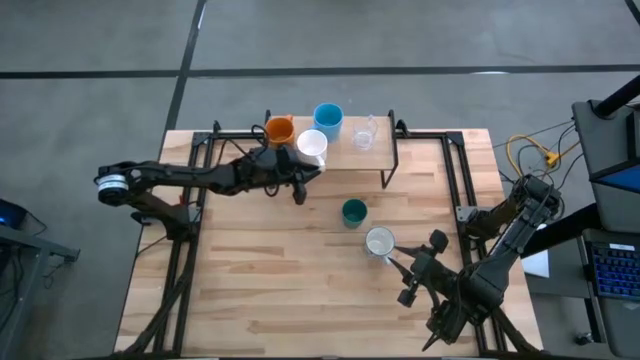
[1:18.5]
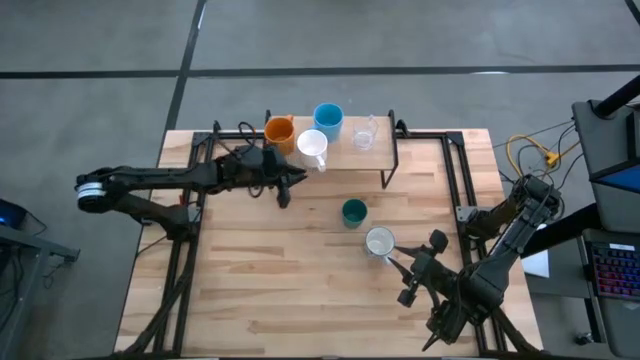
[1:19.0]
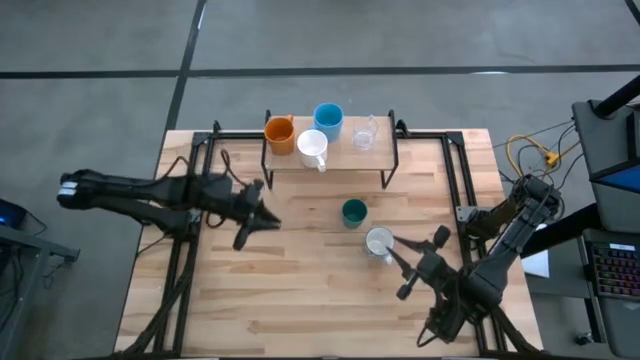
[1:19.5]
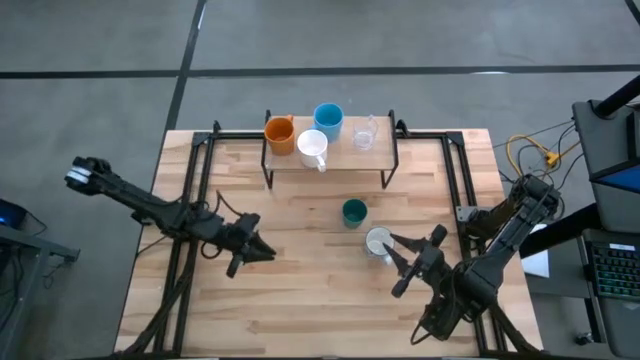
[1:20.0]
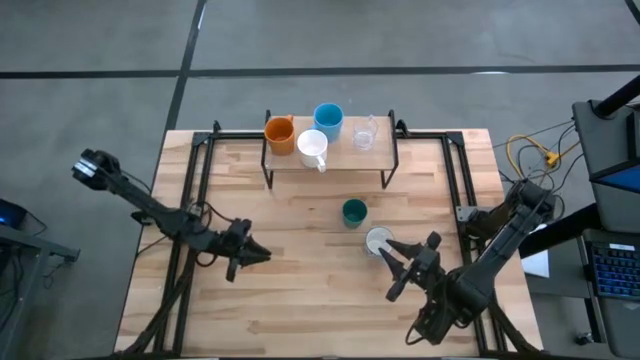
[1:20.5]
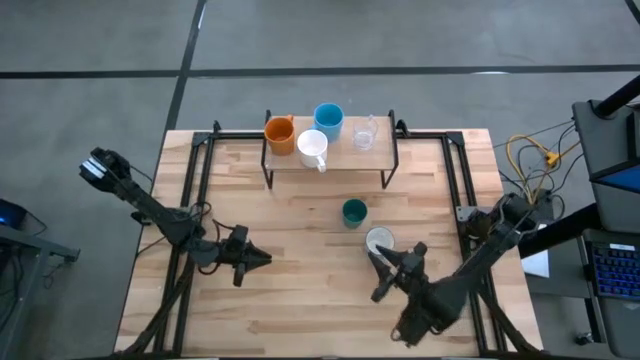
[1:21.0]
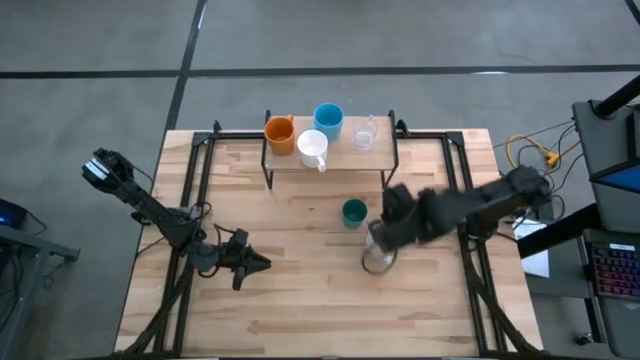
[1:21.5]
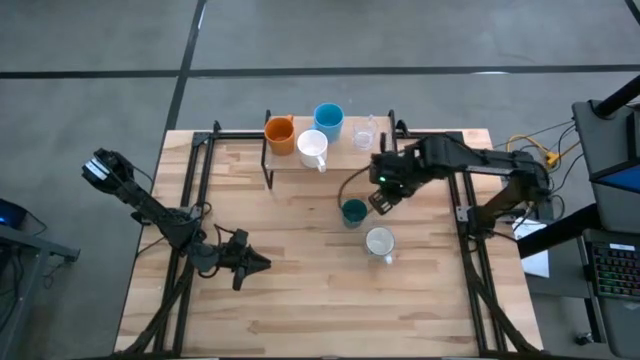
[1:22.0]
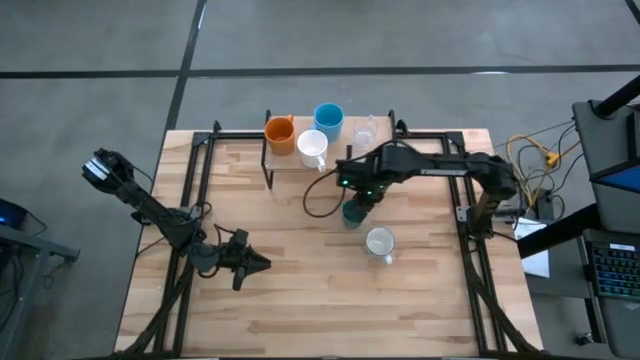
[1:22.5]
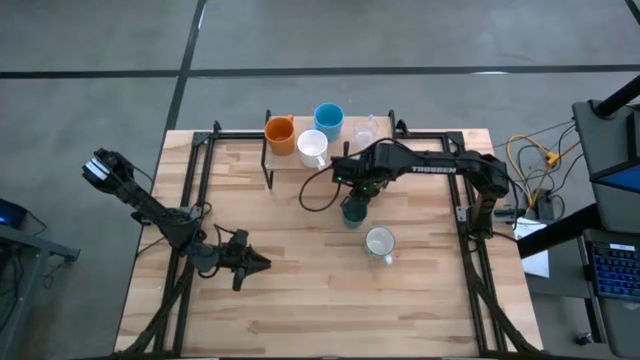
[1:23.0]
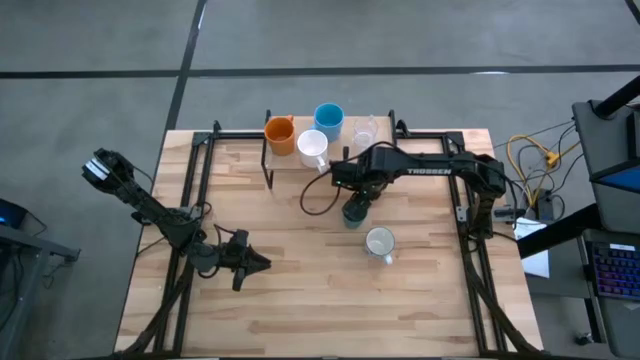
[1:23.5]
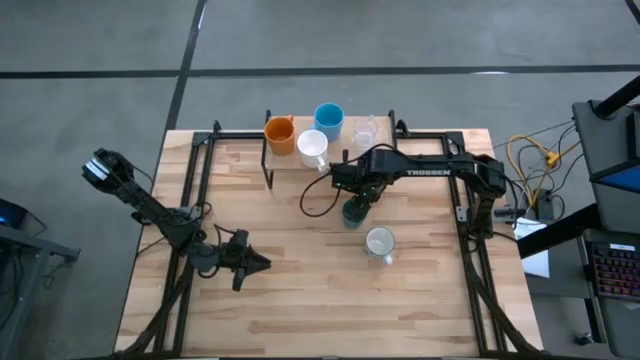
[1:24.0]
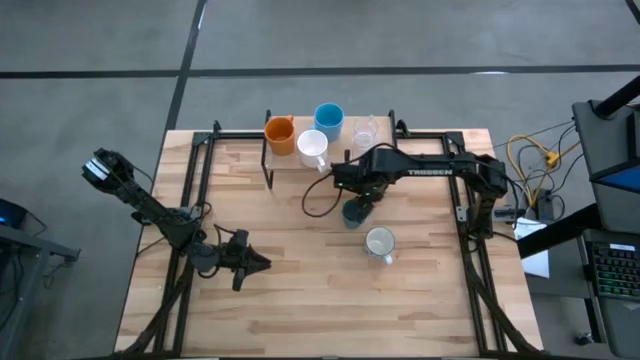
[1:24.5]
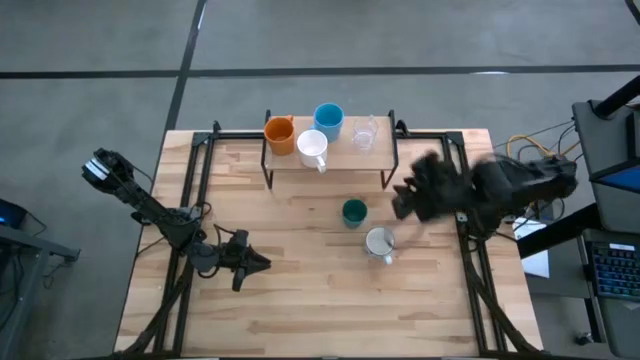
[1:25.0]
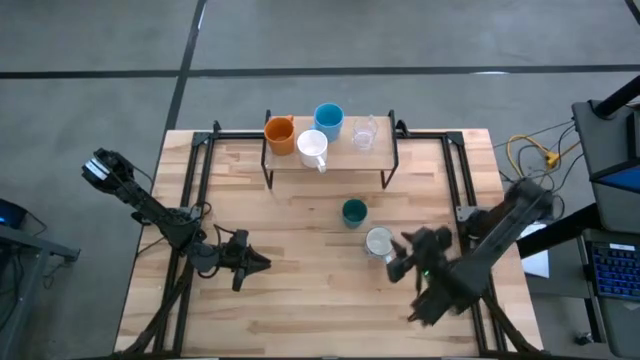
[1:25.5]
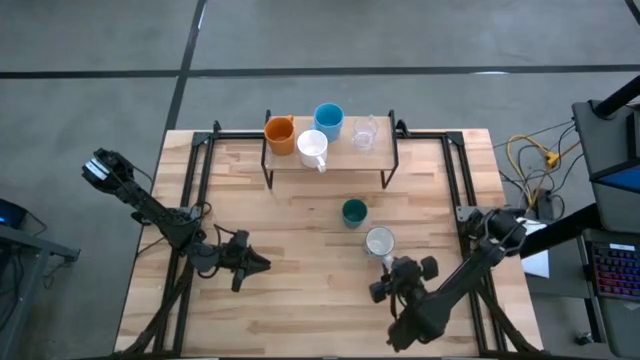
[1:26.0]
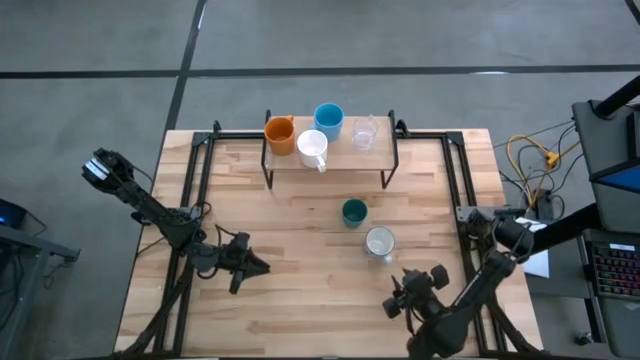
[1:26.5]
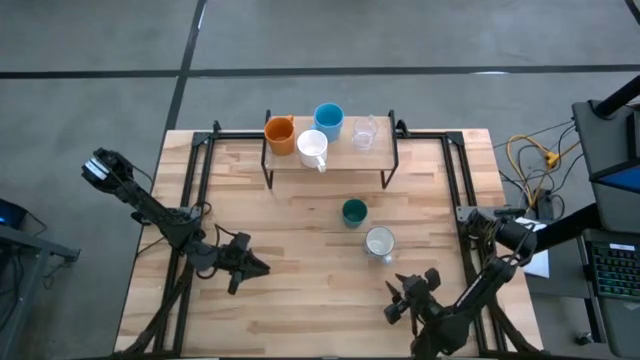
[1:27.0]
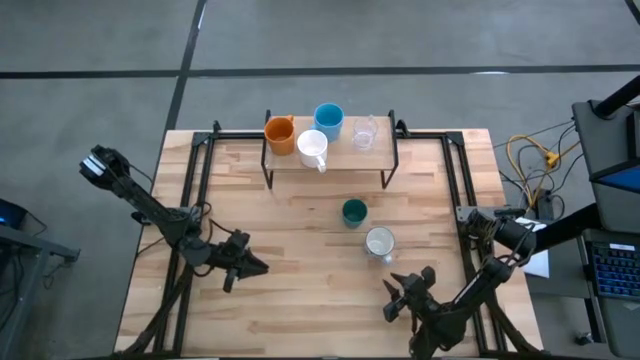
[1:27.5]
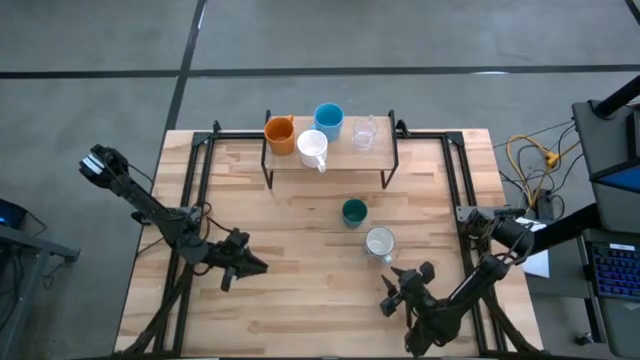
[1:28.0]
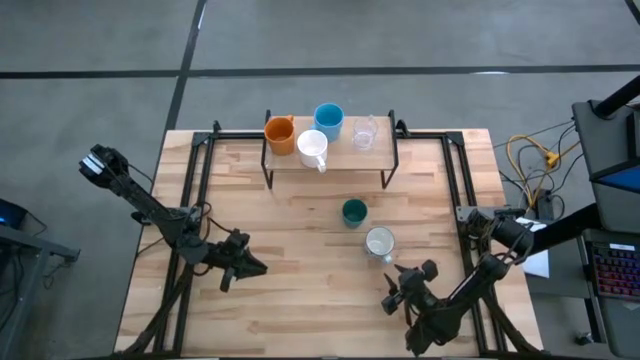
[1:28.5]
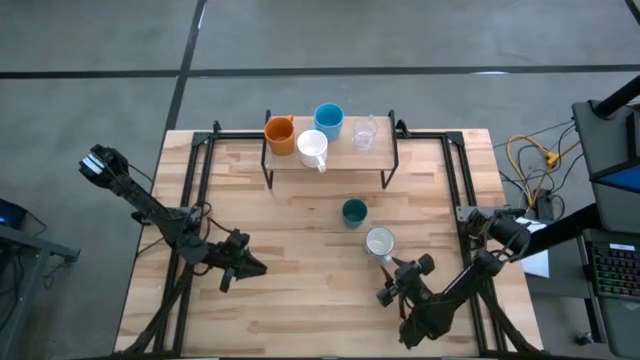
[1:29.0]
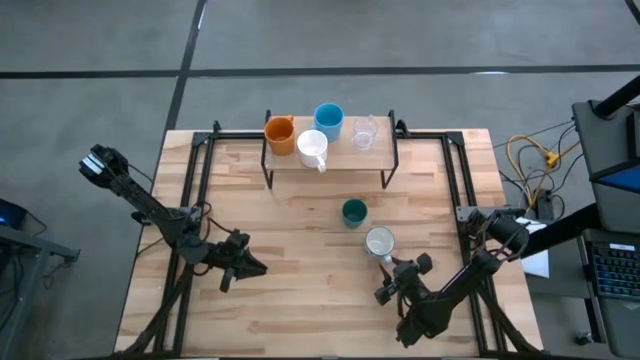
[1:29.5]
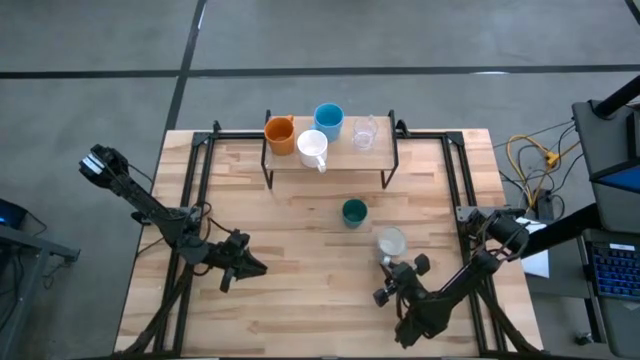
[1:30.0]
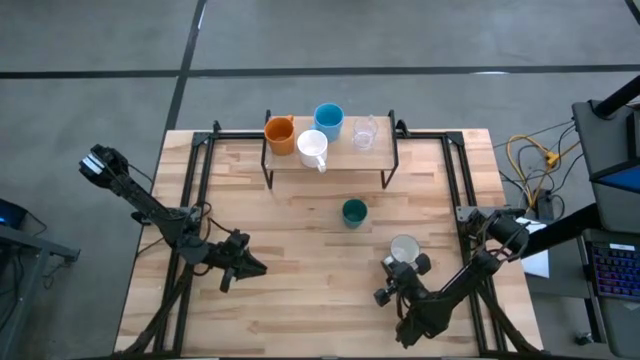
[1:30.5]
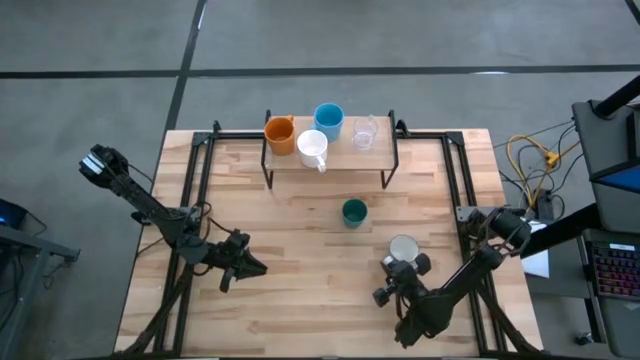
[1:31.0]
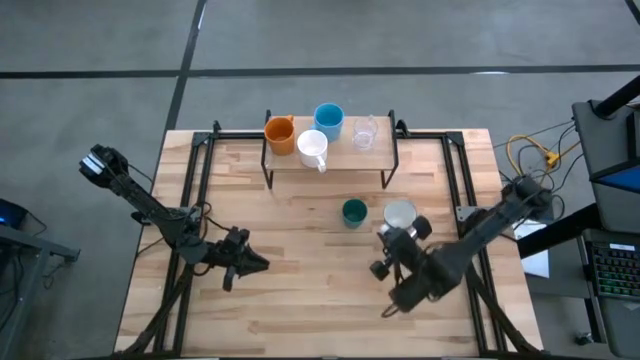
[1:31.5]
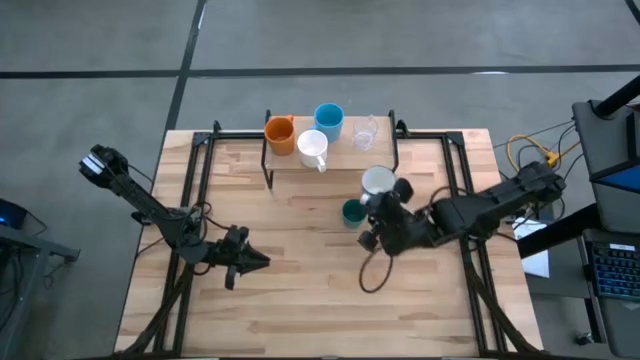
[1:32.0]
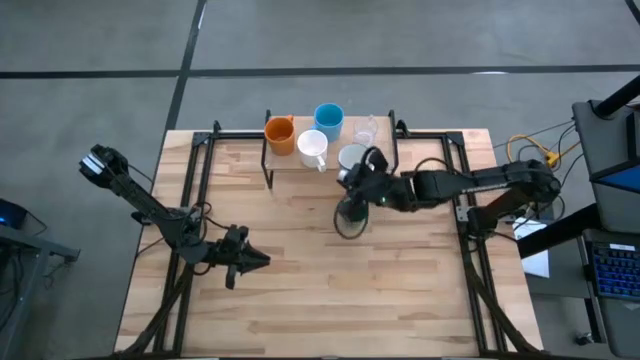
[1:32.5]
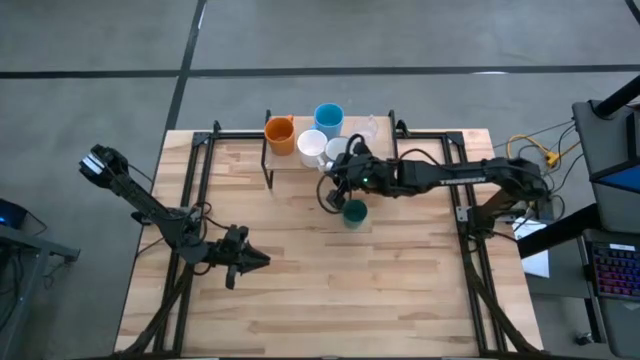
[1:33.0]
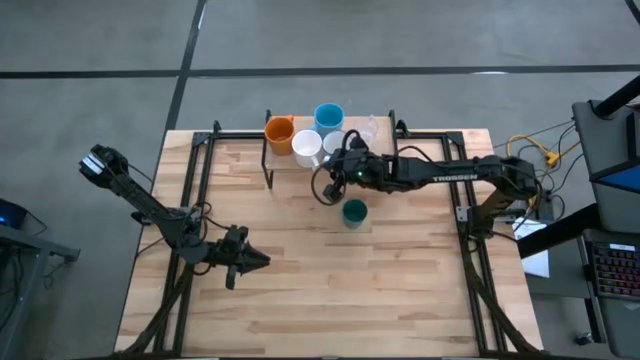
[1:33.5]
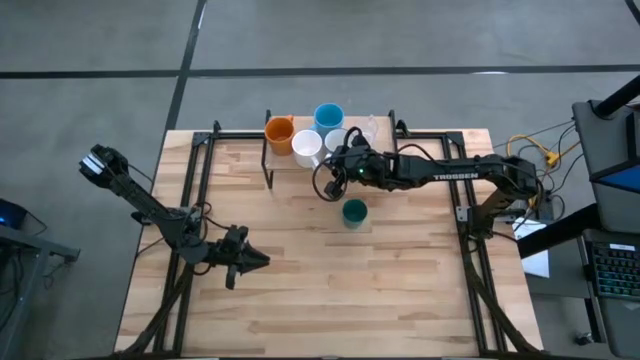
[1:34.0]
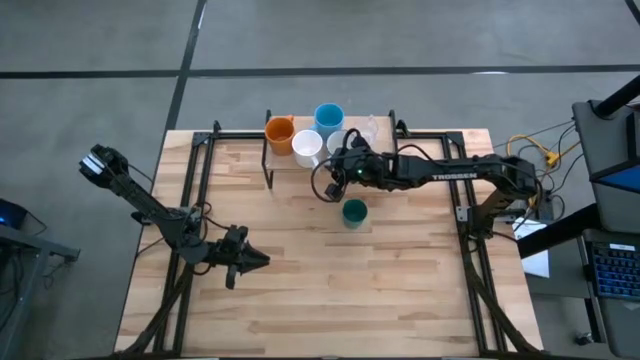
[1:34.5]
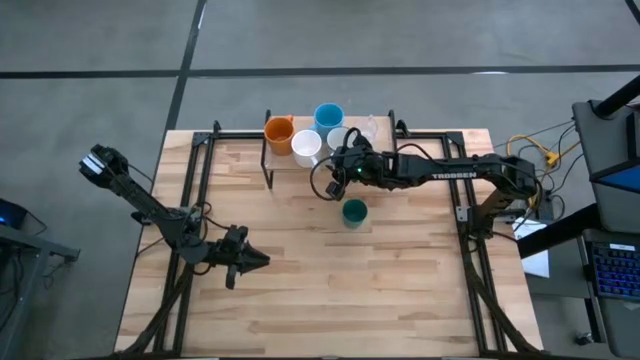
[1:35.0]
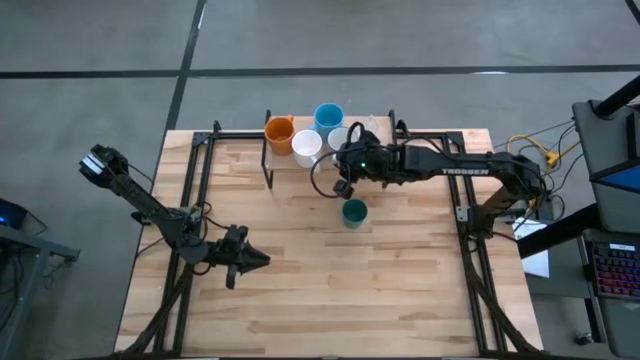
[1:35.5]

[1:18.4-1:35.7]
Task: Stack small to large cups/mugs on shelf
Put the white patterned mug on the shelf
